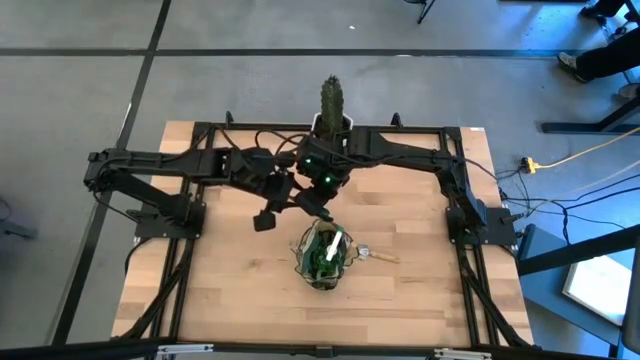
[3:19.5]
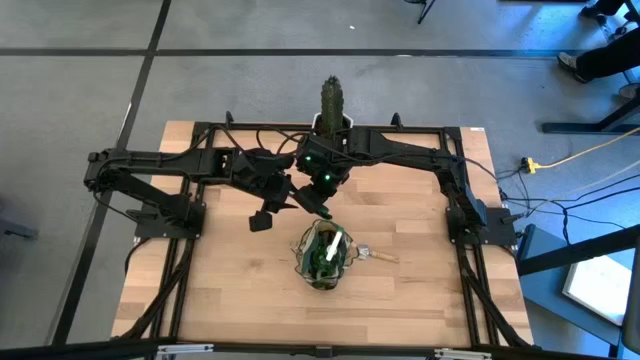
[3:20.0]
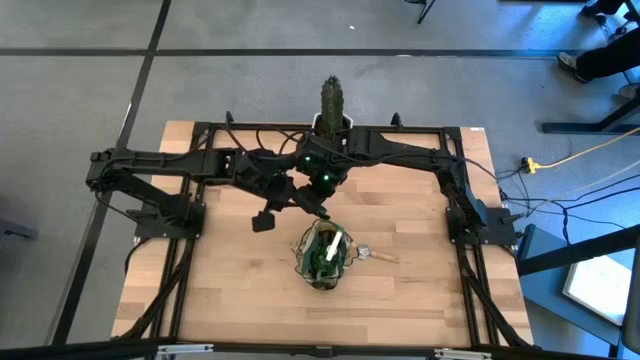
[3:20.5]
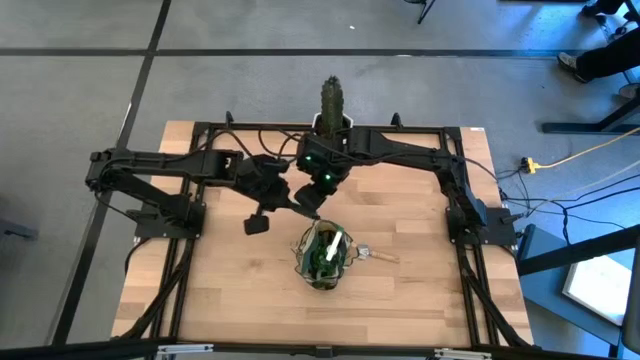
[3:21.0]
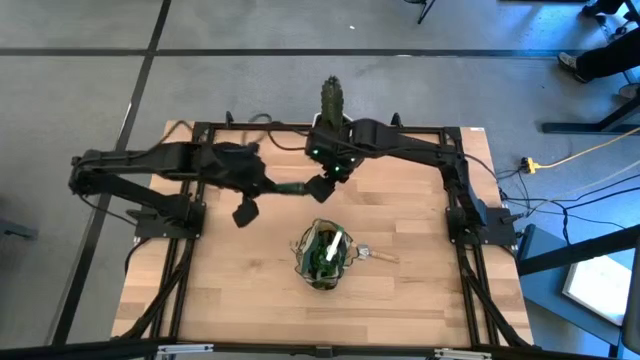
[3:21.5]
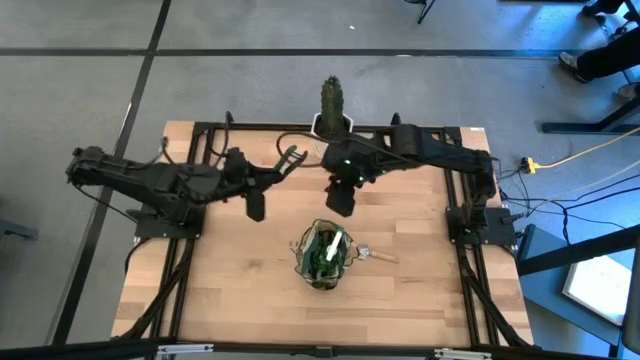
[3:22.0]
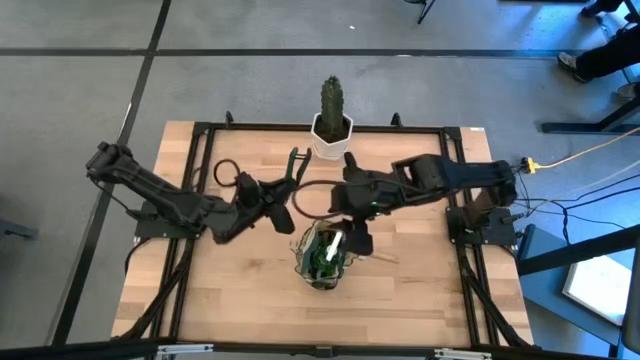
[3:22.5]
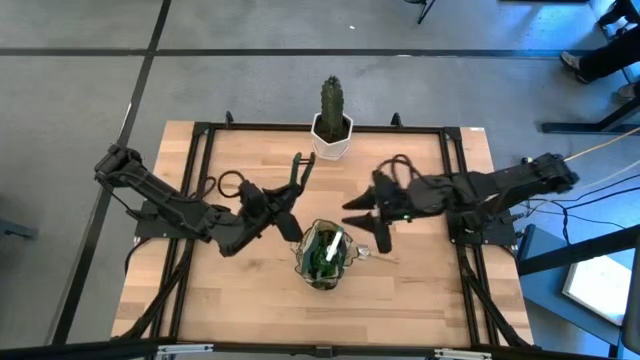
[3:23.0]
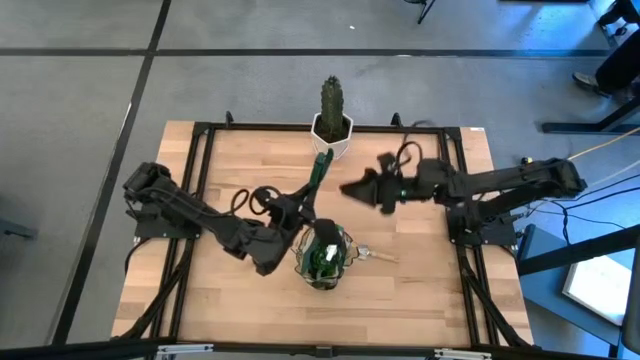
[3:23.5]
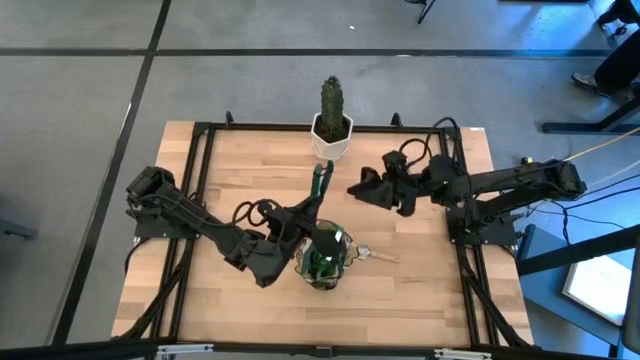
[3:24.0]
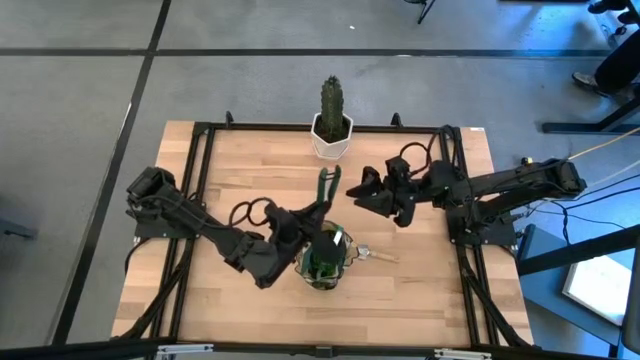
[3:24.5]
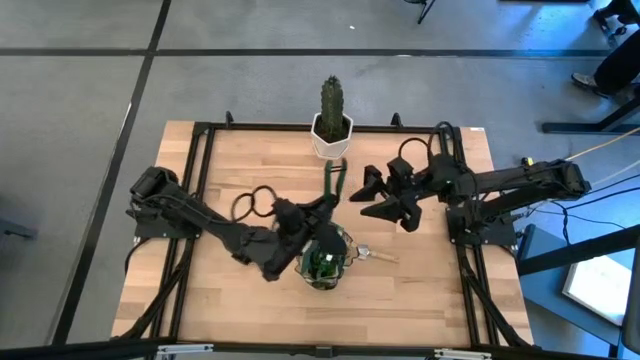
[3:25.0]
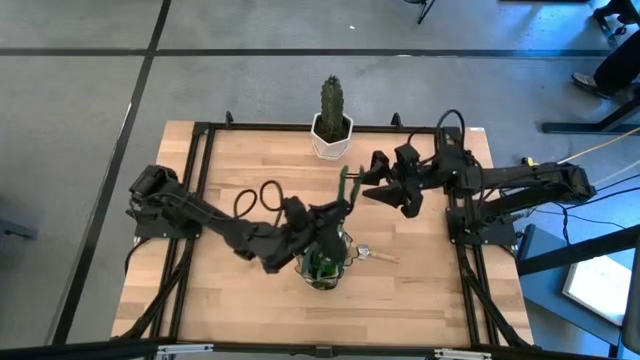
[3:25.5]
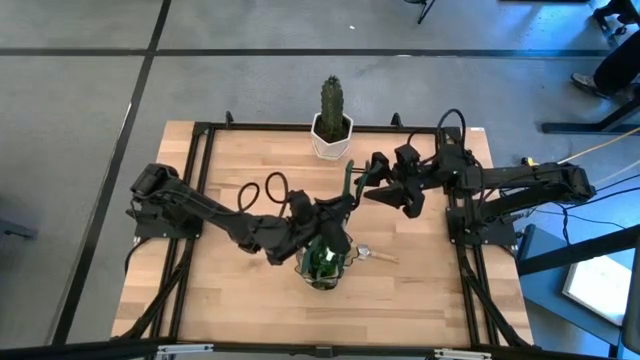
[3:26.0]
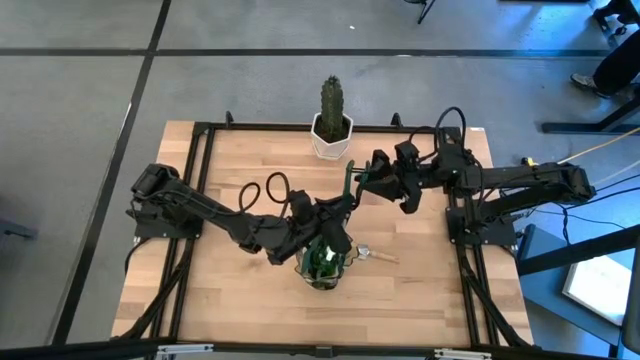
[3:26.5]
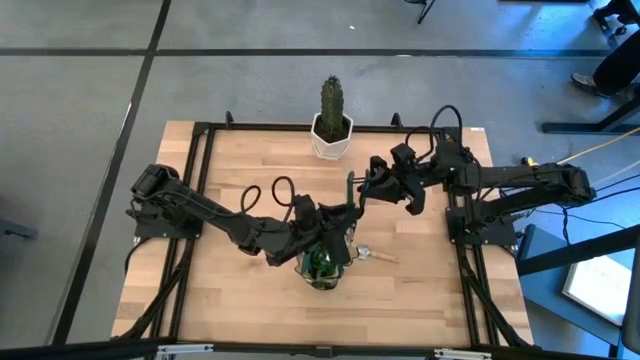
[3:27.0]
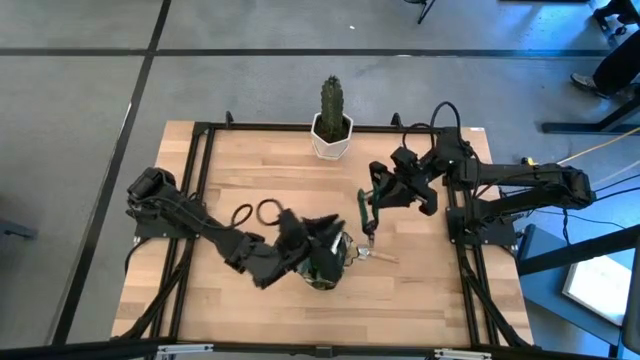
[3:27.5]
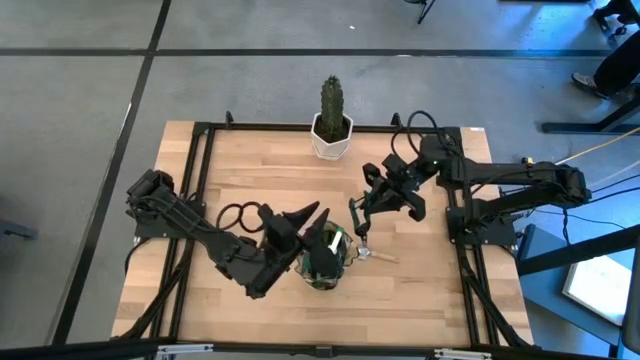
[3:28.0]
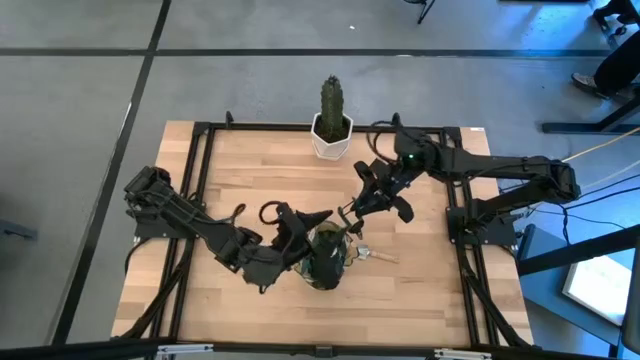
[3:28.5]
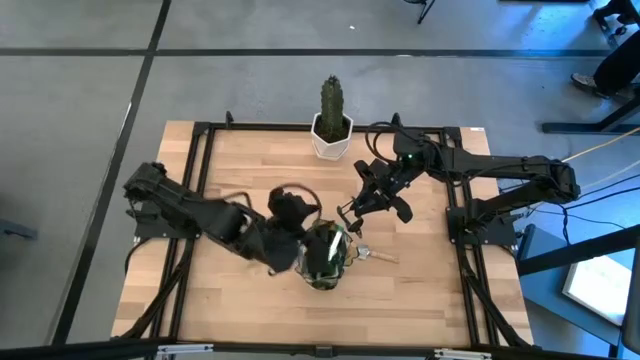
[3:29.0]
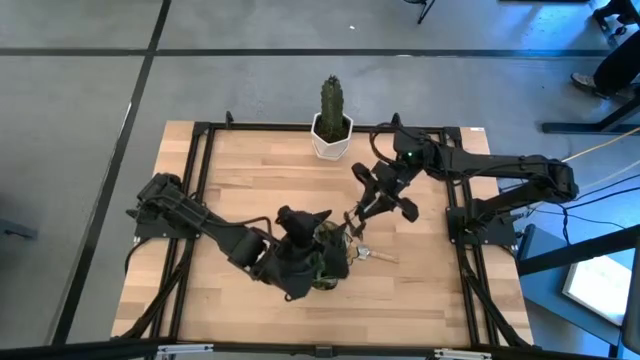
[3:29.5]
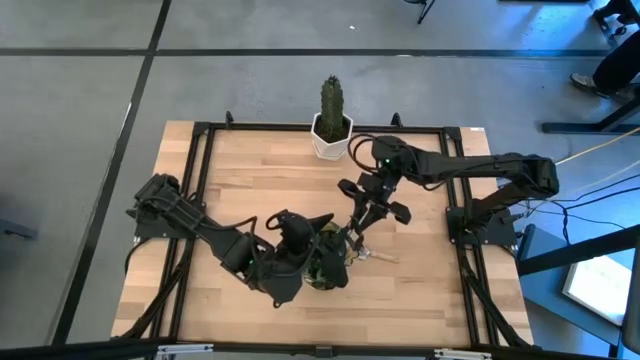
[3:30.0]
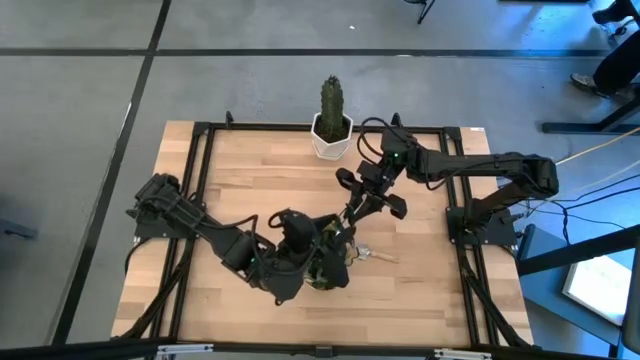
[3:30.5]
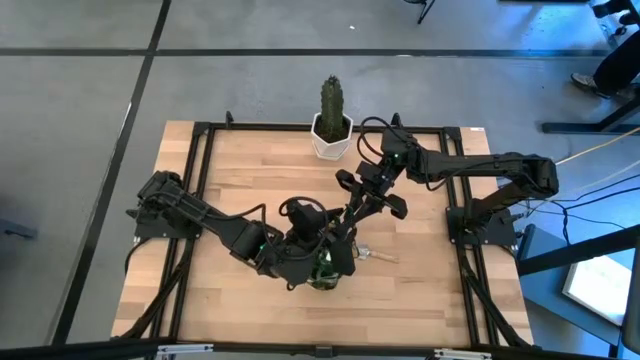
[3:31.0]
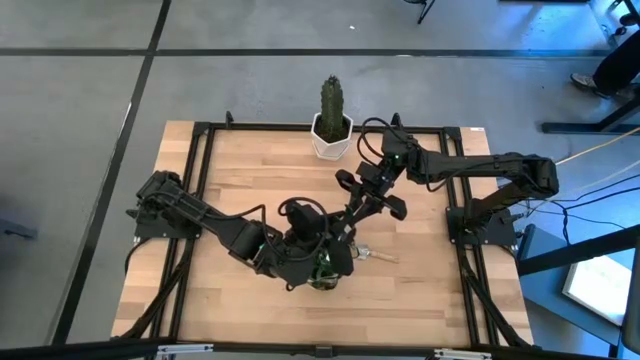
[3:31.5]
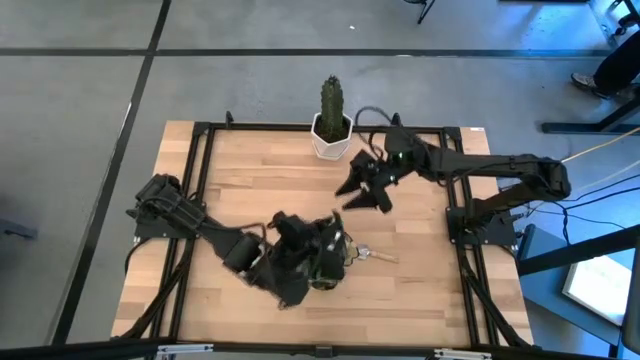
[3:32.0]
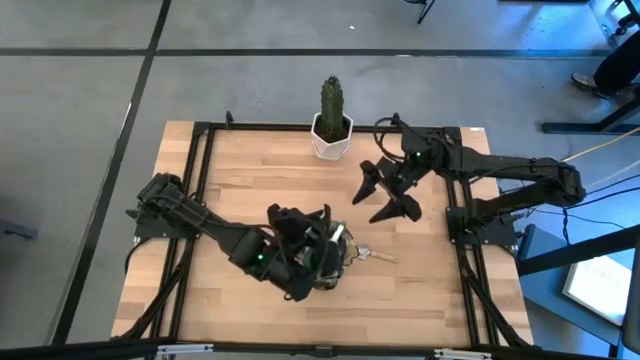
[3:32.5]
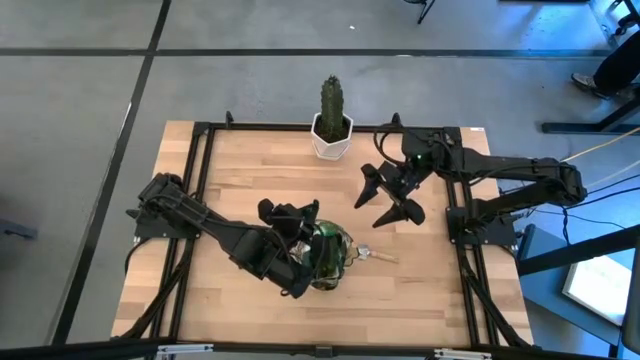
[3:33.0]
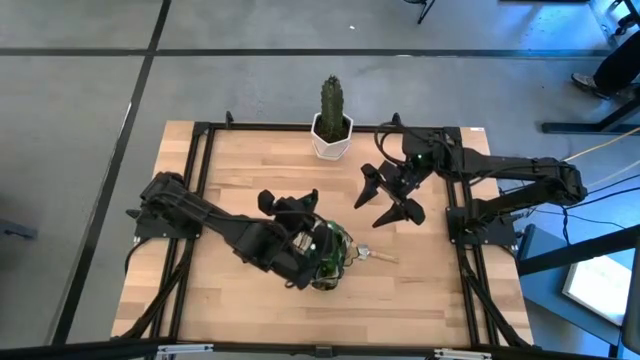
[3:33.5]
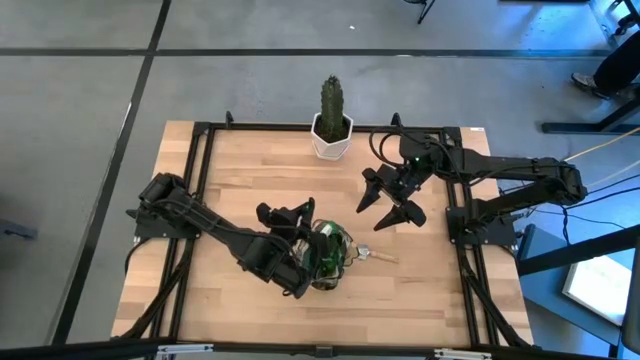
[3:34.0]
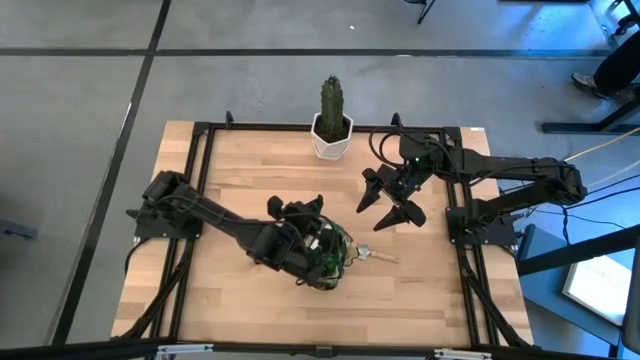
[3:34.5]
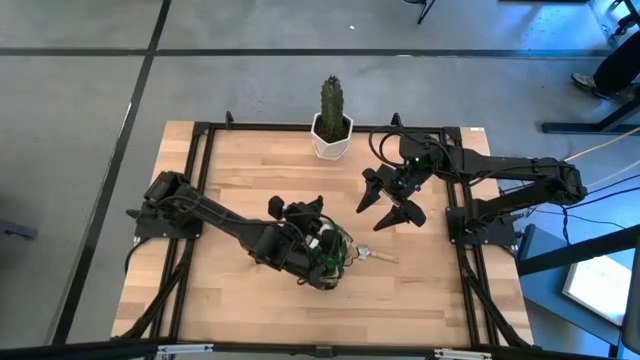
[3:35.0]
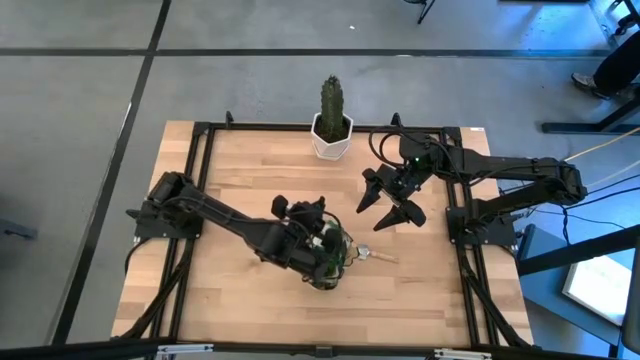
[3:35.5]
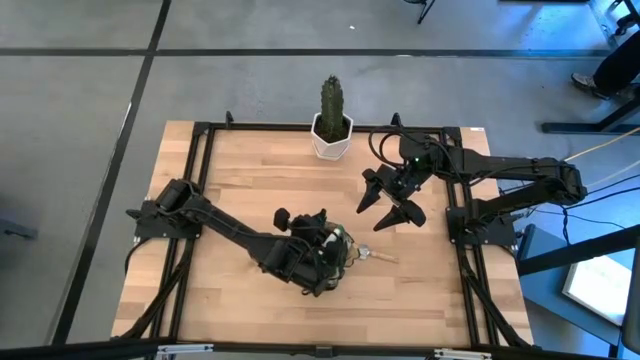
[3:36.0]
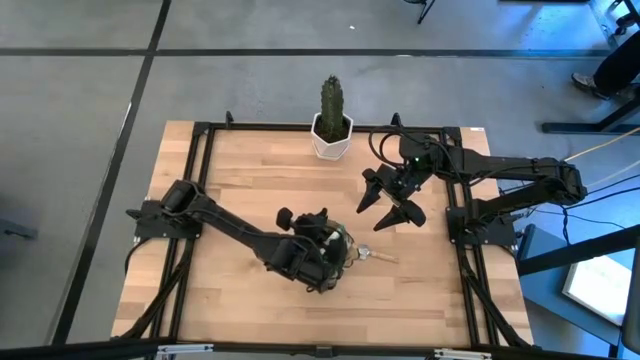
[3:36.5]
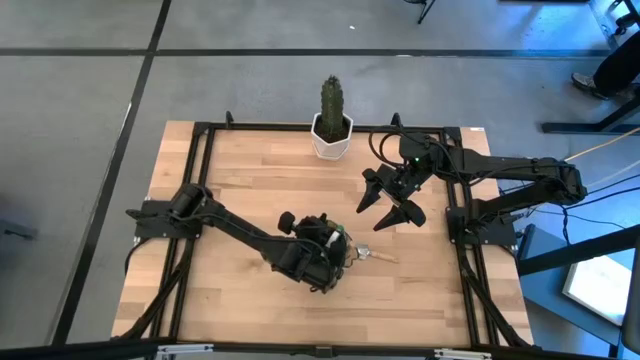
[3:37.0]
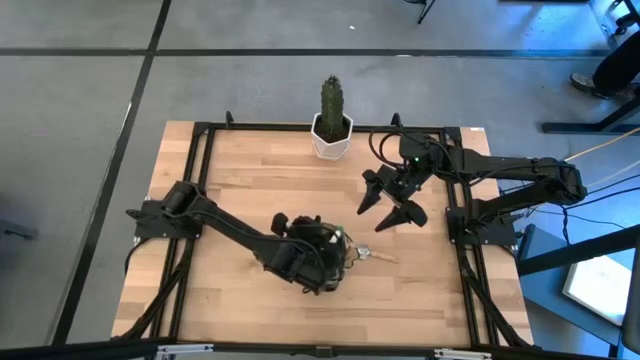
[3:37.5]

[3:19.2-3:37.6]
Task: Pick & Place Garden tools in Gardening bag
Put the shear scissors into the gardening bag

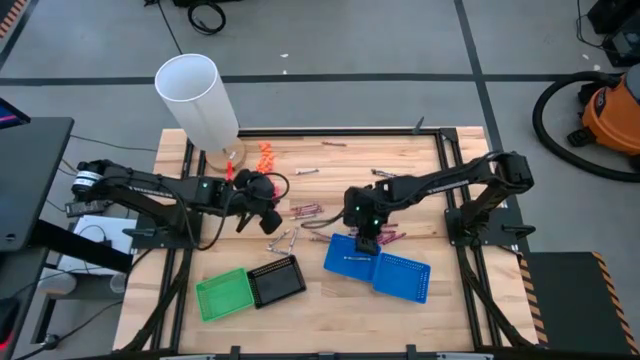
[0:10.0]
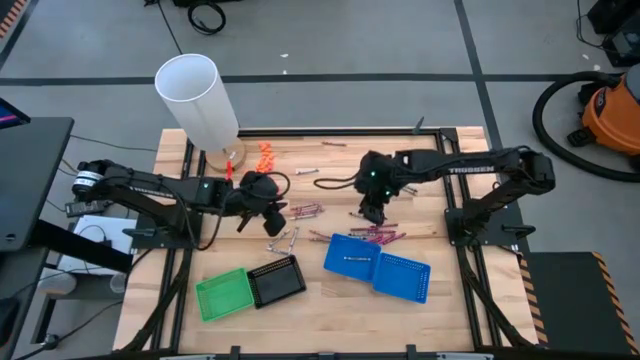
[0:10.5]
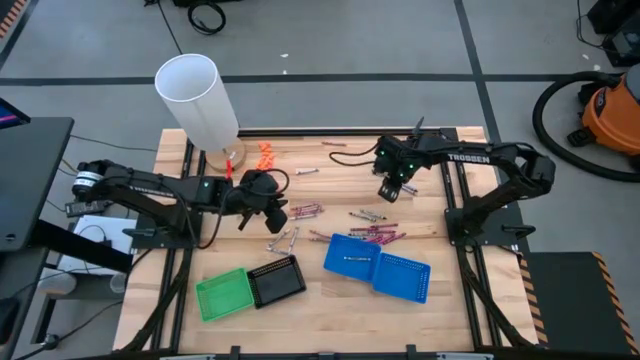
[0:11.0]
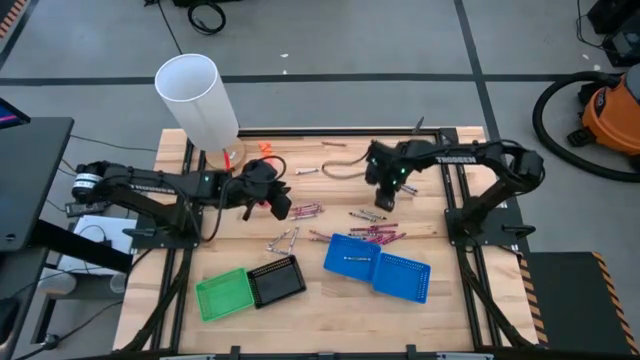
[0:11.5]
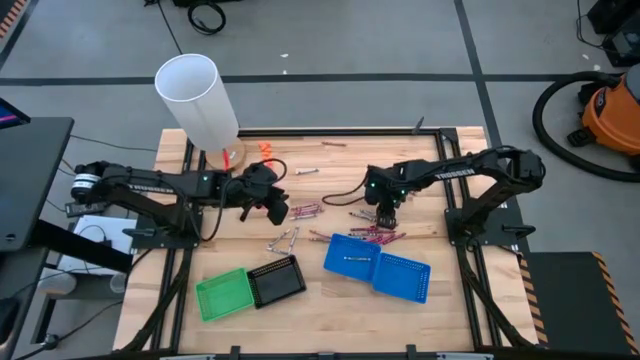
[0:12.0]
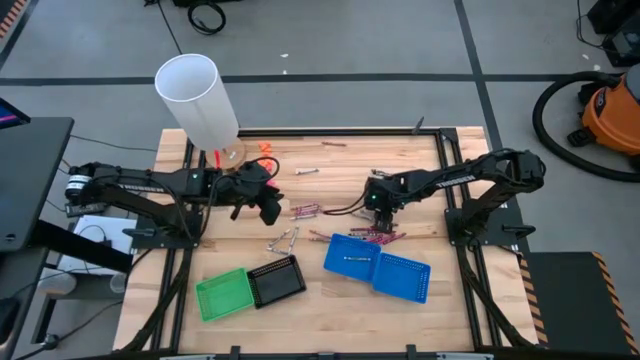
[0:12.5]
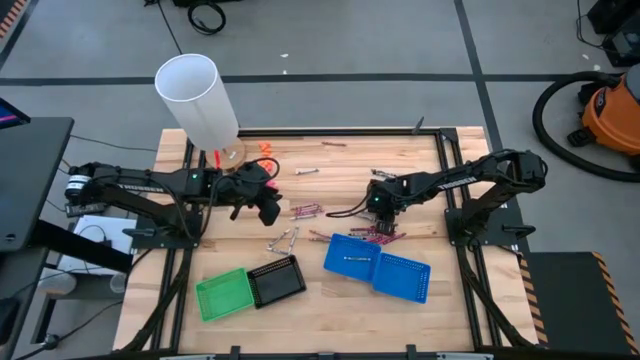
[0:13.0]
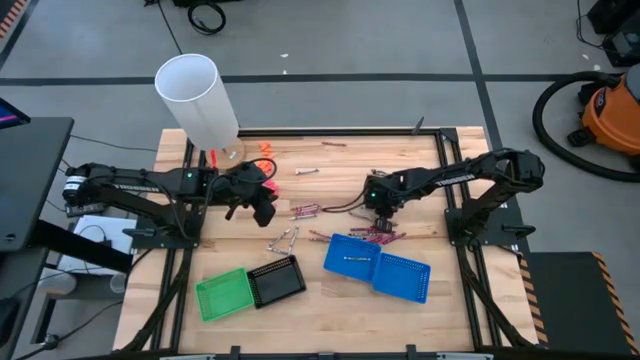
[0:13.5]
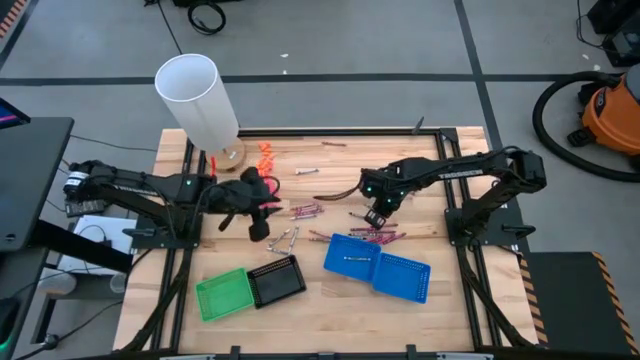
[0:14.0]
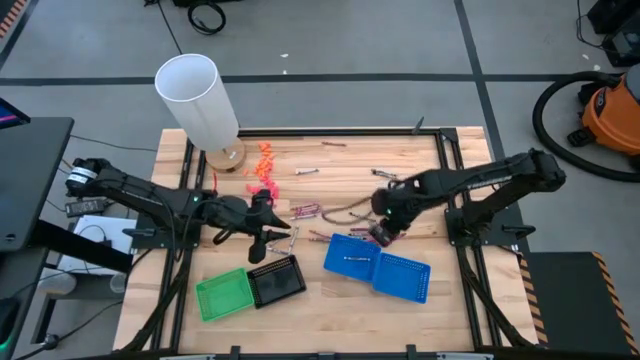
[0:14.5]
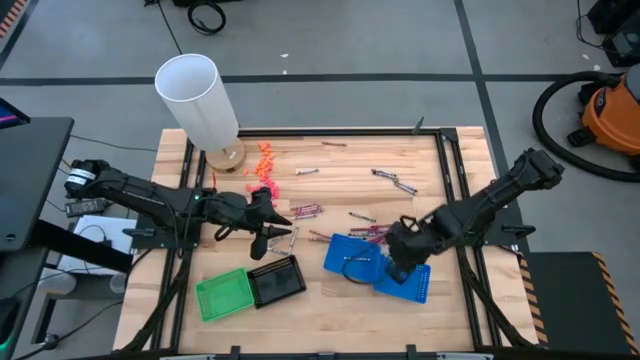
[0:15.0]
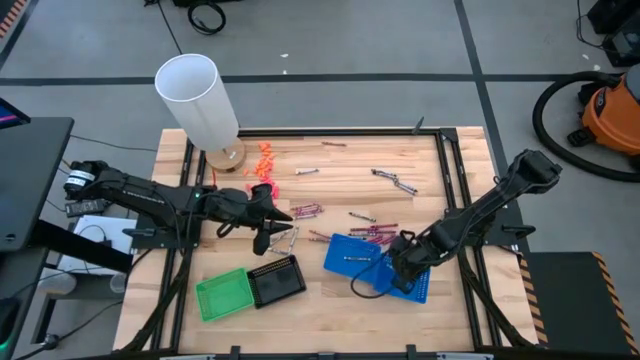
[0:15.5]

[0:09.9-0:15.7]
Task: Sort crayons
Put the black crayon into the right blue bin
